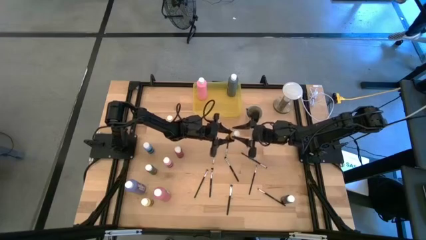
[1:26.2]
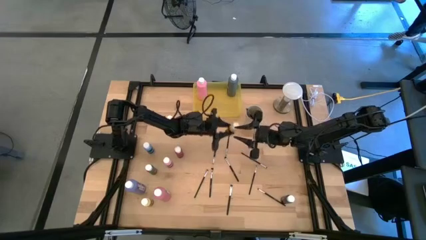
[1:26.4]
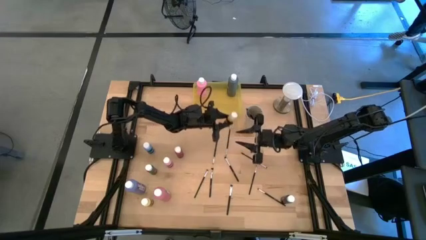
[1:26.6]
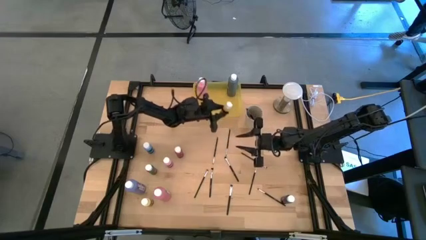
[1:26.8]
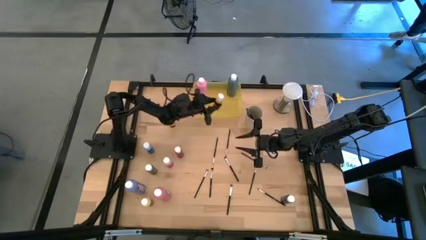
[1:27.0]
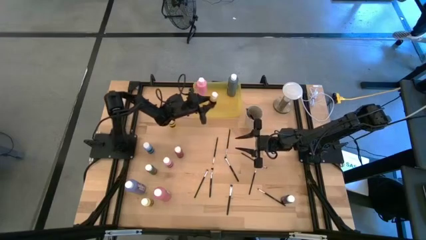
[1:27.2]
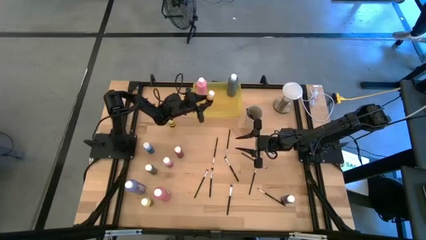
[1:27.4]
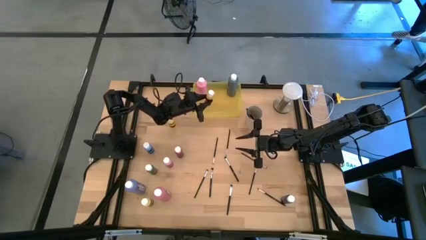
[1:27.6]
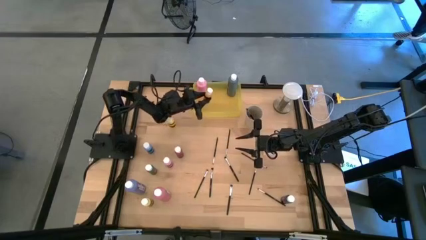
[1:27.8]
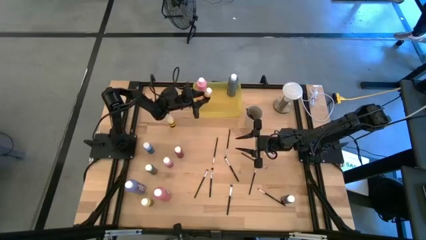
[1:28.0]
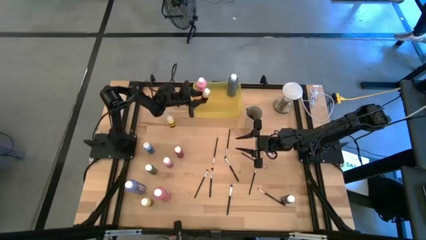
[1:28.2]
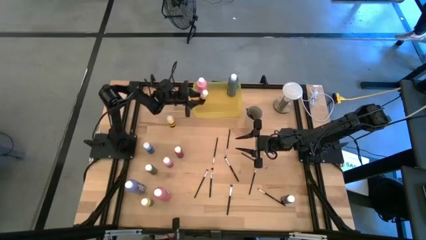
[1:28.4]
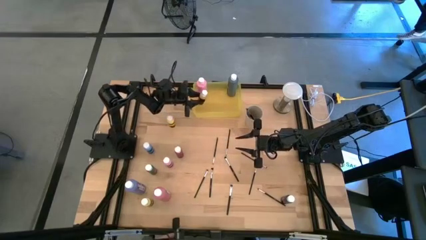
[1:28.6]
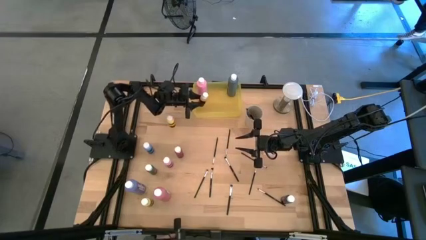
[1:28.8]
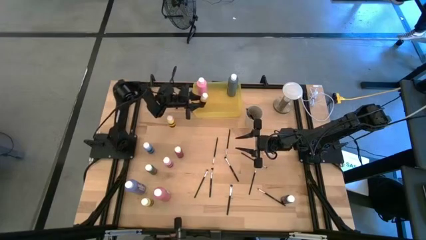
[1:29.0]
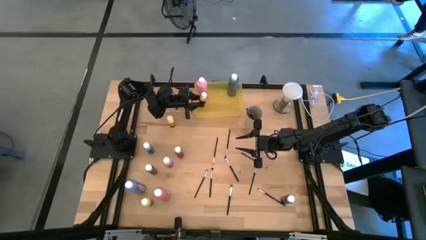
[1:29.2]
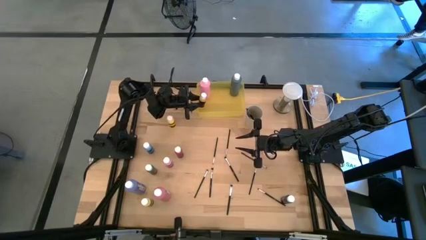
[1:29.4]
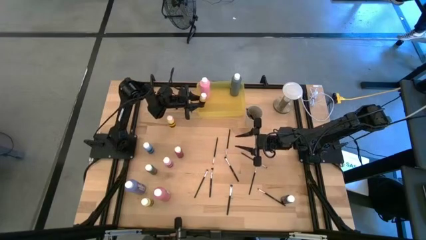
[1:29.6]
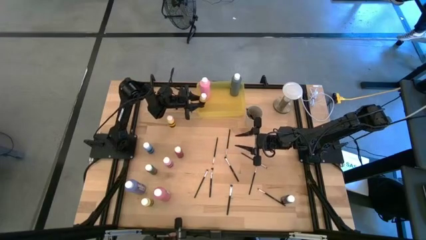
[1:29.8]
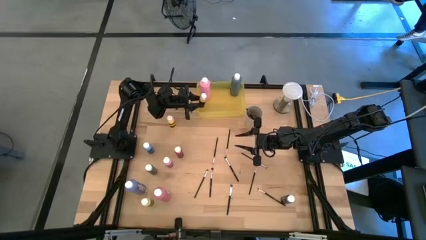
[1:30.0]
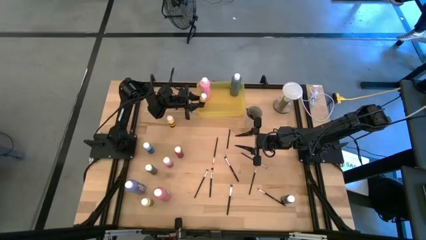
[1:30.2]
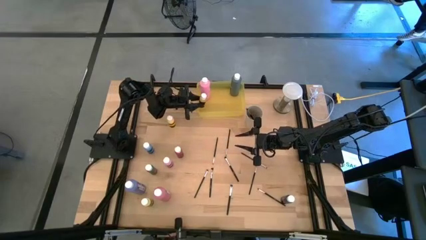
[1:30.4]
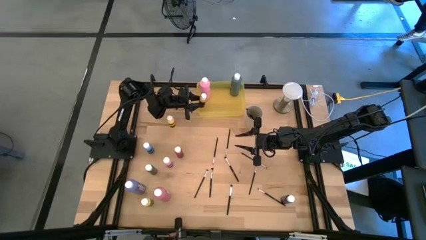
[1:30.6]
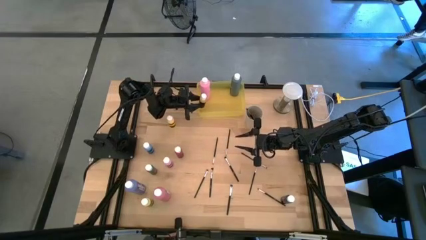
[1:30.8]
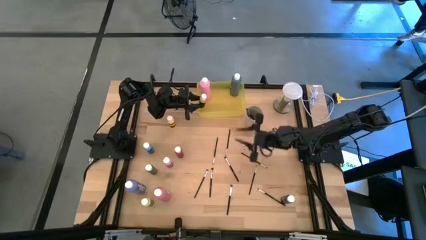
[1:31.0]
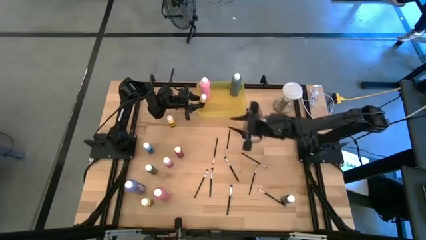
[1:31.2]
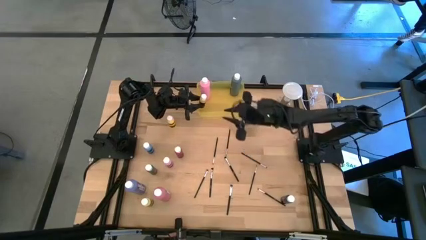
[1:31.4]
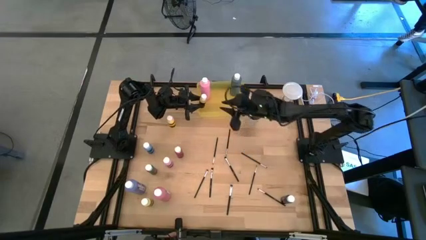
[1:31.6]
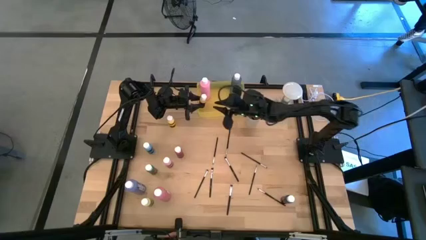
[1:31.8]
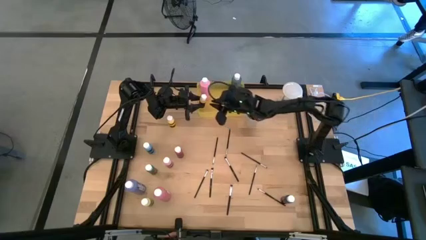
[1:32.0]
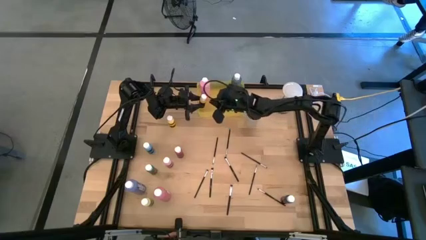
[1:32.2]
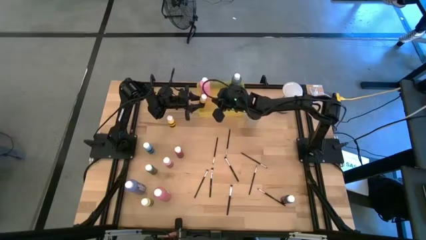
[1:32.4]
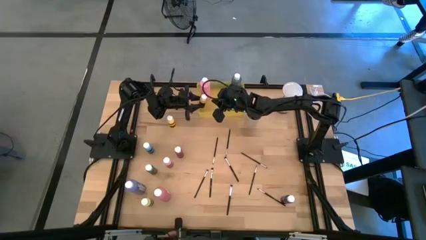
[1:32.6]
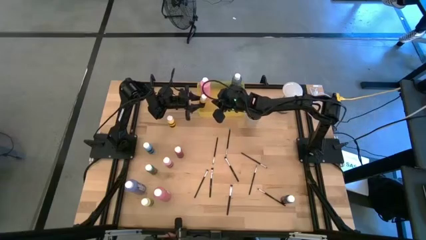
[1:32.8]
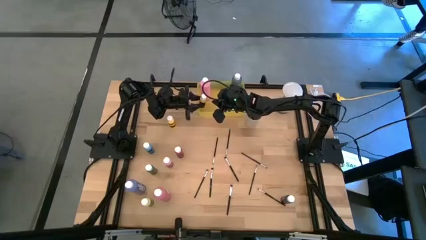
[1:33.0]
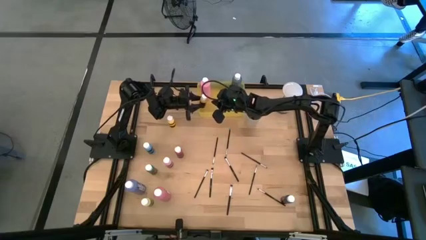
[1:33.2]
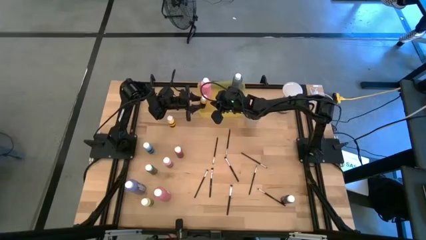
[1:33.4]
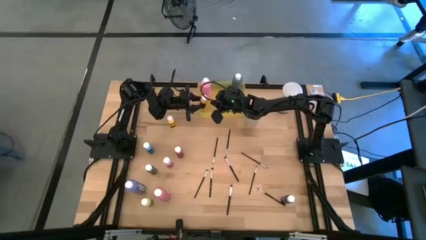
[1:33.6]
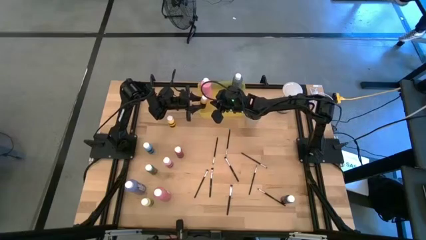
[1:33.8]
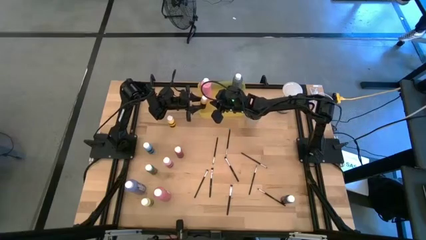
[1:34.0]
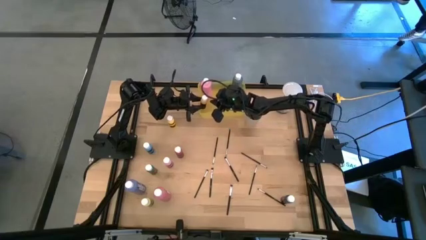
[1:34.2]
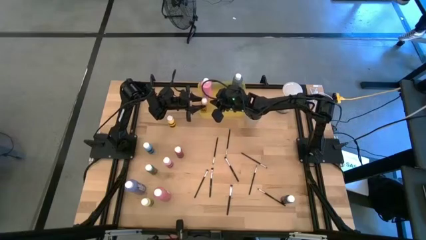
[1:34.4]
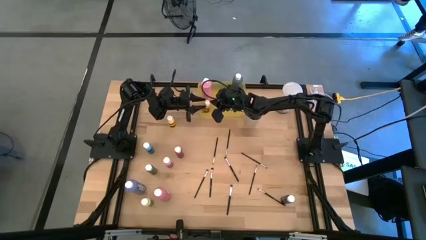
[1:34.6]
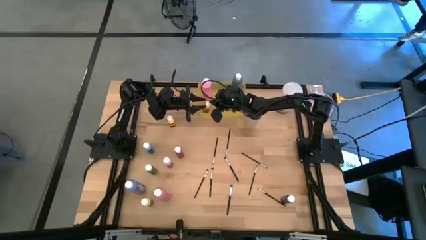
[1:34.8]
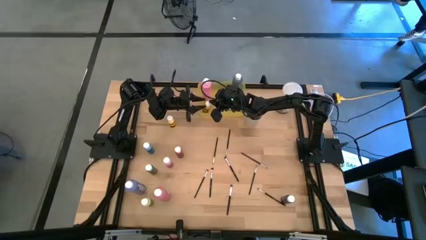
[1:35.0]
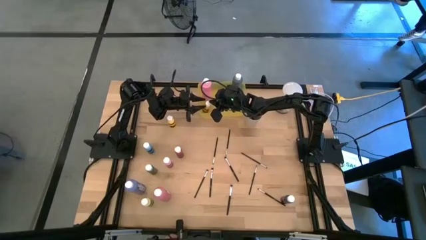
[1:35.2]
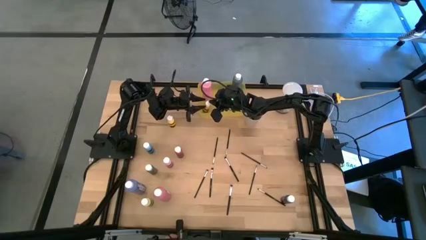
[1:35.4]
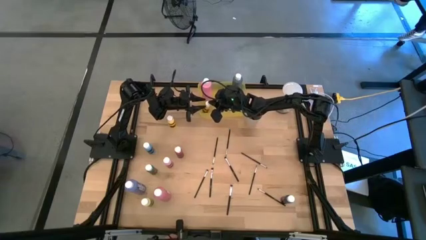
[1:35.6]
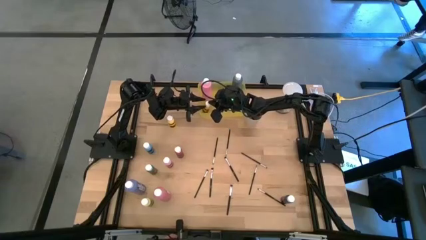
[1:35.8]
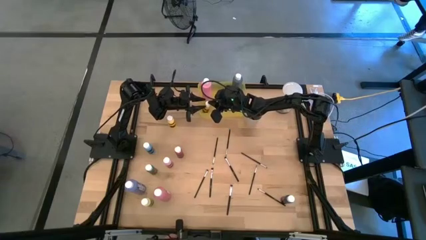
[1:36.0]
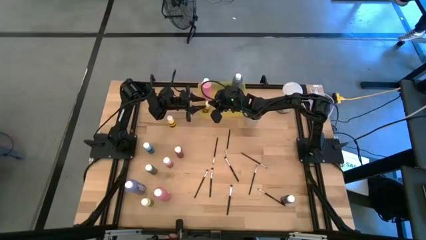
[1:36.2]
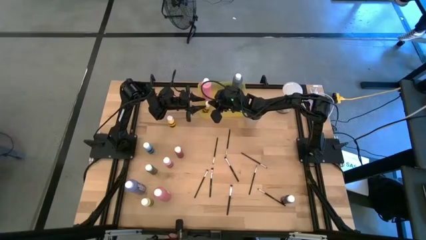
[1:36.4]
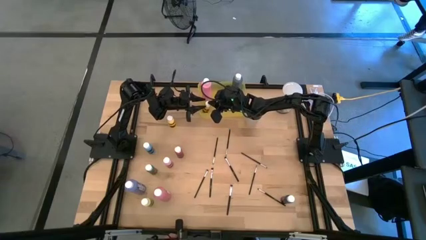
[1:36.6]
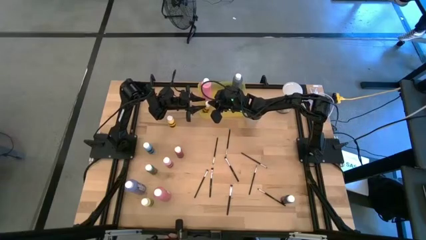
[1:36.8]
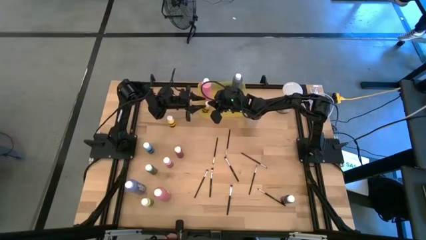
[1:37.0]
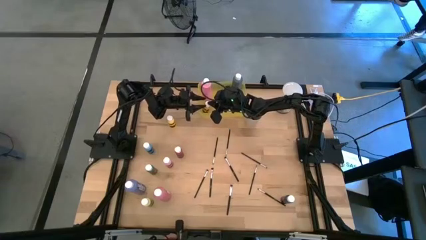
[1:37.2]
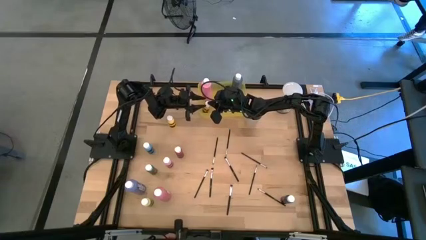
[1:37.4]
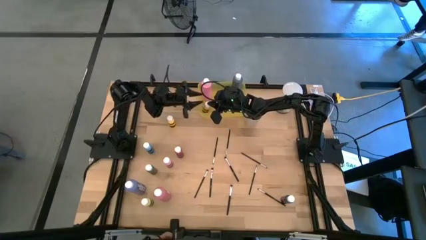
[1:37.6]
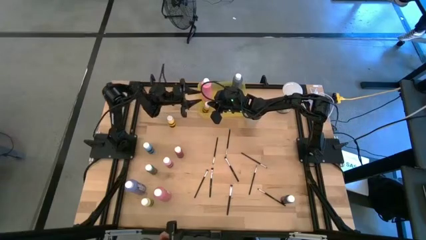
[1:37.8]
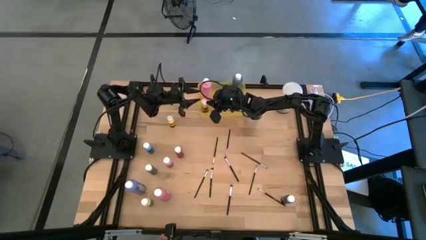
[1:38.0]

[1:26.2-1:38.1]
Task: Pick & Place Paint Supplies
Put the small yellow paint bottle into the yellow bin
